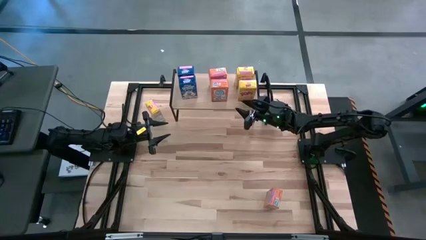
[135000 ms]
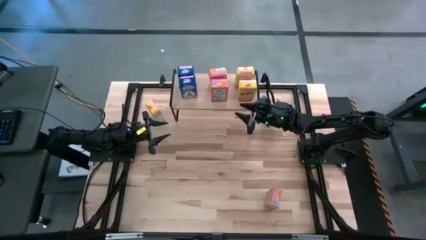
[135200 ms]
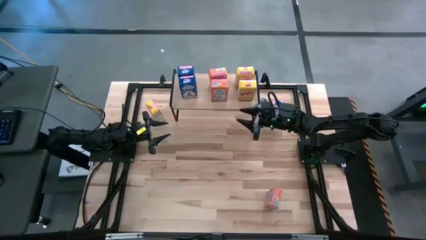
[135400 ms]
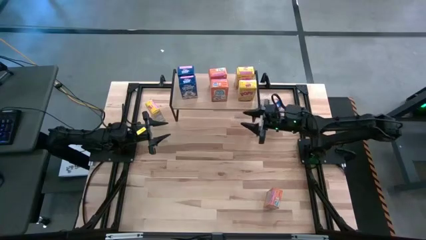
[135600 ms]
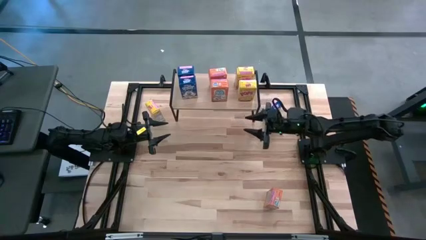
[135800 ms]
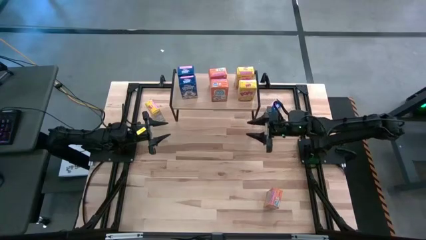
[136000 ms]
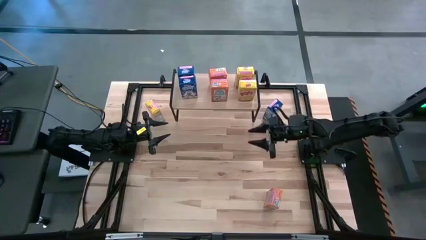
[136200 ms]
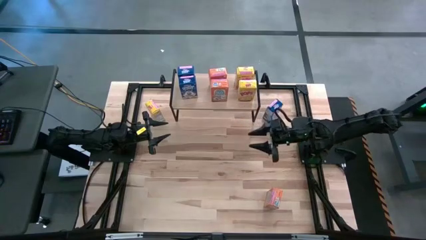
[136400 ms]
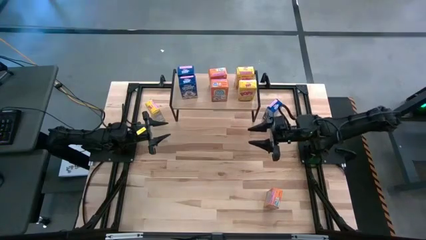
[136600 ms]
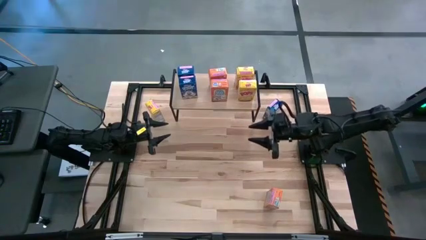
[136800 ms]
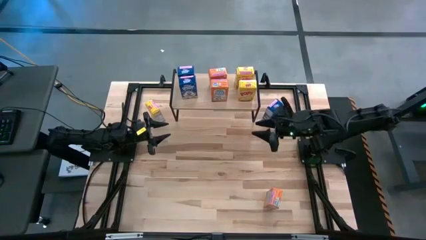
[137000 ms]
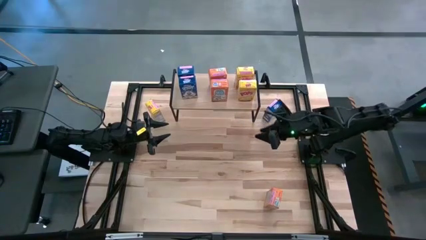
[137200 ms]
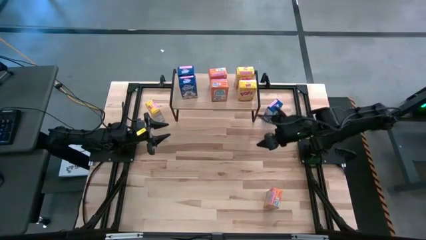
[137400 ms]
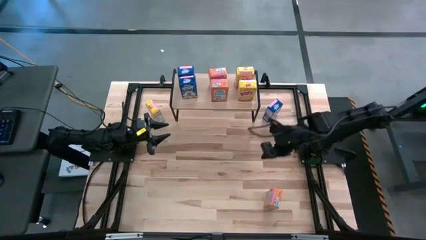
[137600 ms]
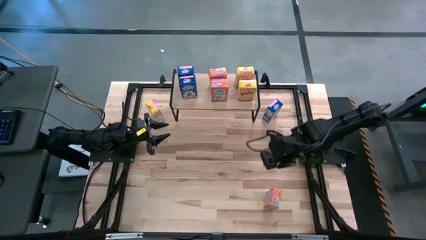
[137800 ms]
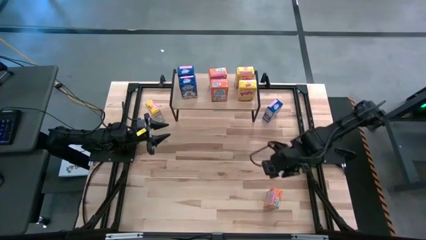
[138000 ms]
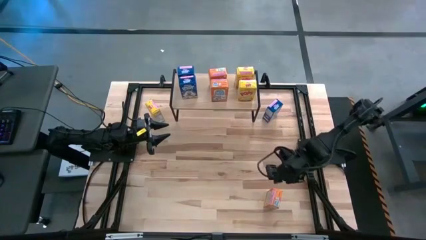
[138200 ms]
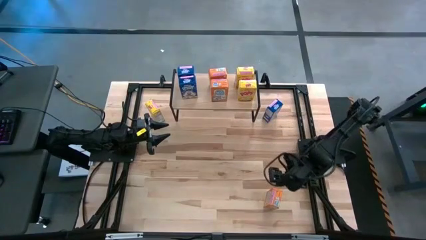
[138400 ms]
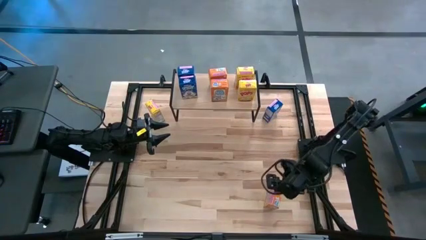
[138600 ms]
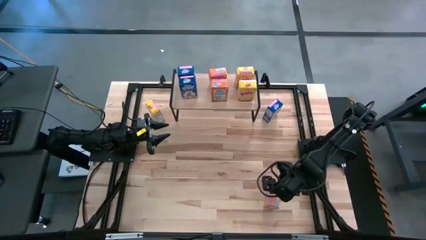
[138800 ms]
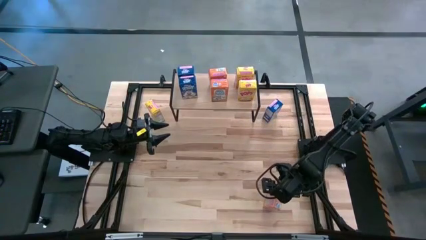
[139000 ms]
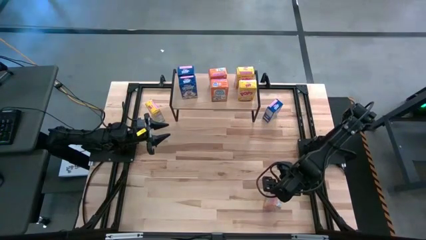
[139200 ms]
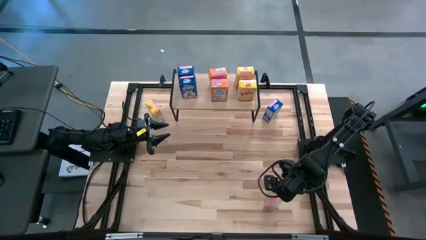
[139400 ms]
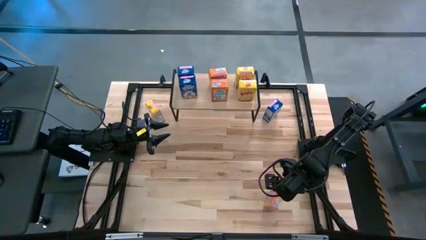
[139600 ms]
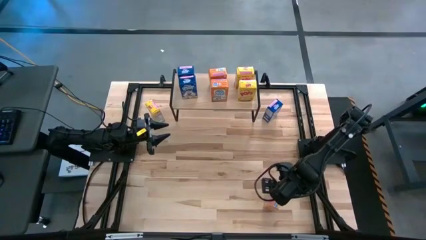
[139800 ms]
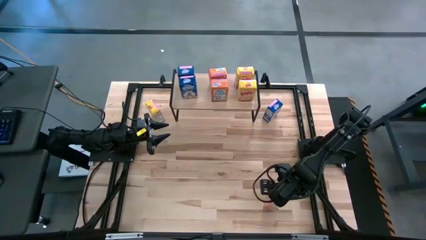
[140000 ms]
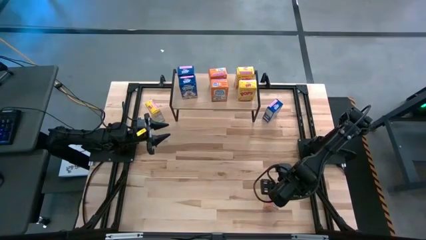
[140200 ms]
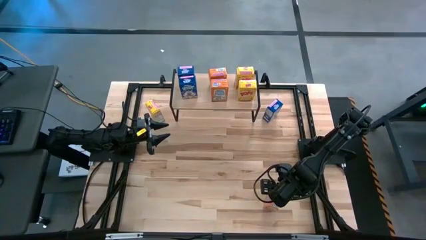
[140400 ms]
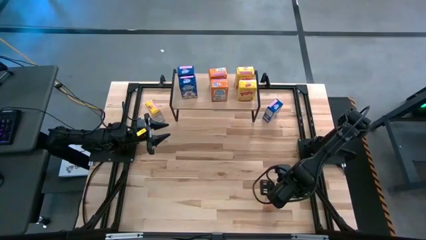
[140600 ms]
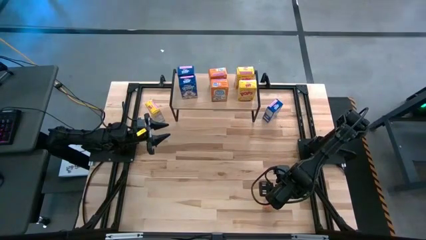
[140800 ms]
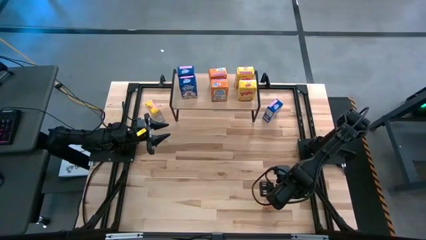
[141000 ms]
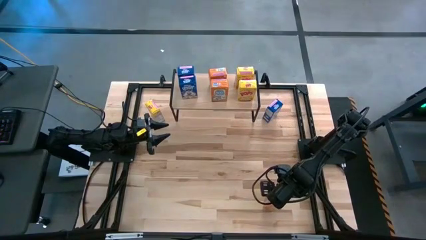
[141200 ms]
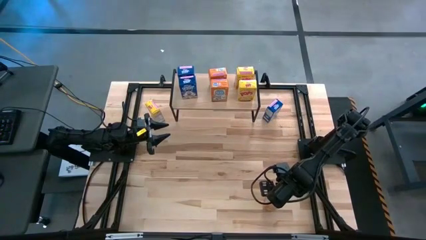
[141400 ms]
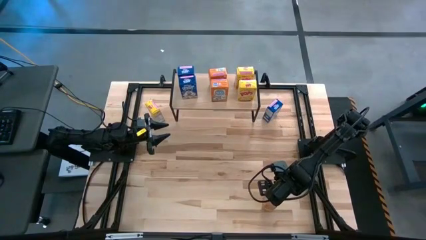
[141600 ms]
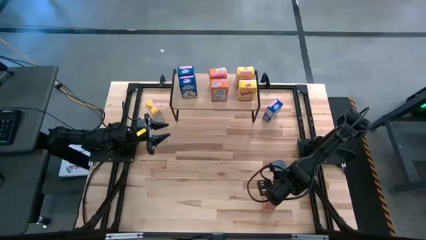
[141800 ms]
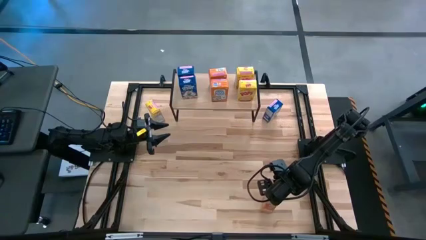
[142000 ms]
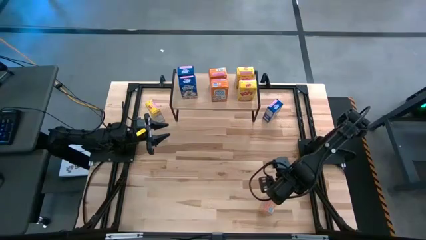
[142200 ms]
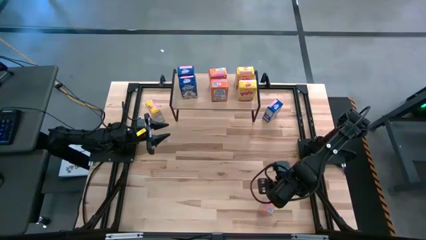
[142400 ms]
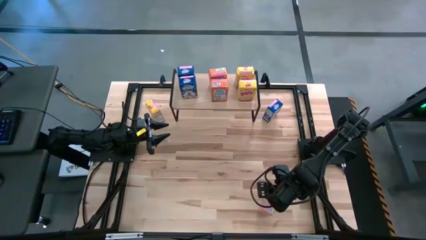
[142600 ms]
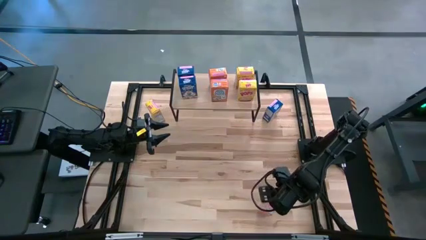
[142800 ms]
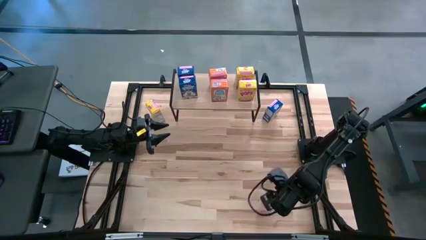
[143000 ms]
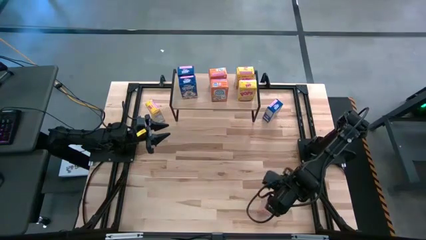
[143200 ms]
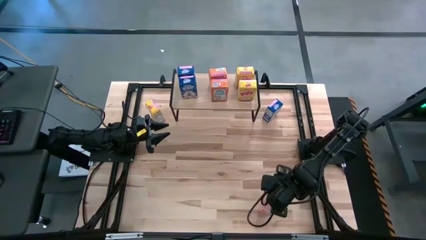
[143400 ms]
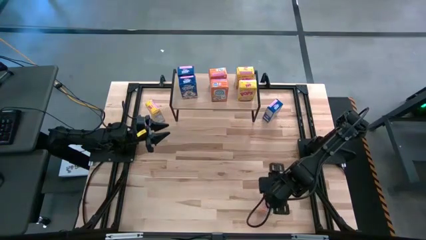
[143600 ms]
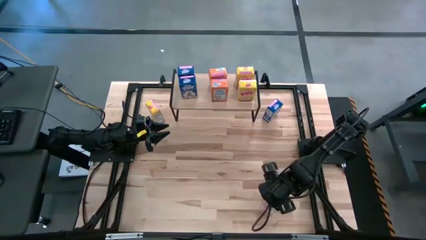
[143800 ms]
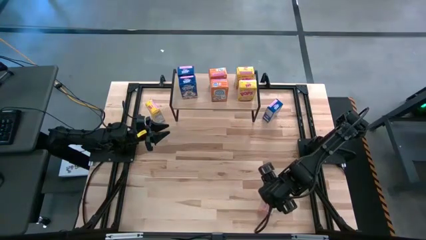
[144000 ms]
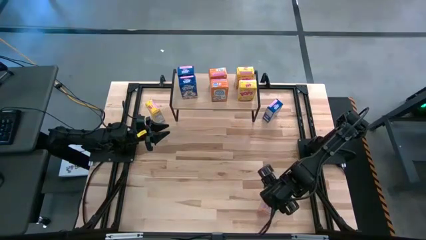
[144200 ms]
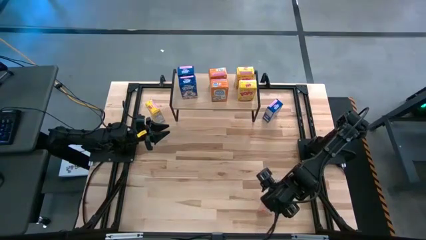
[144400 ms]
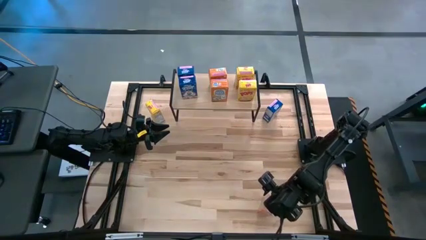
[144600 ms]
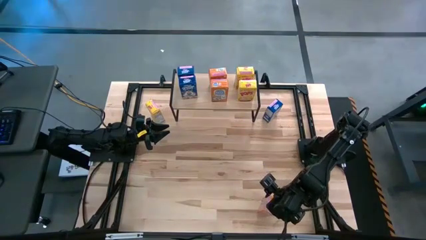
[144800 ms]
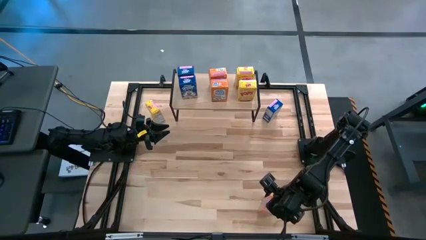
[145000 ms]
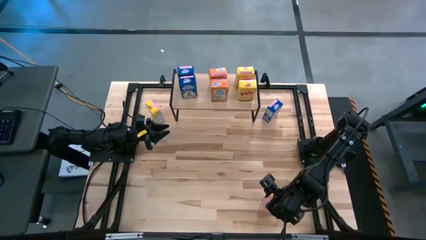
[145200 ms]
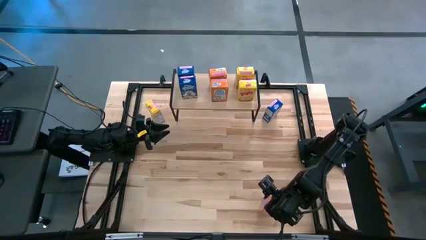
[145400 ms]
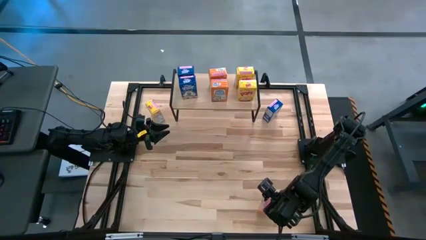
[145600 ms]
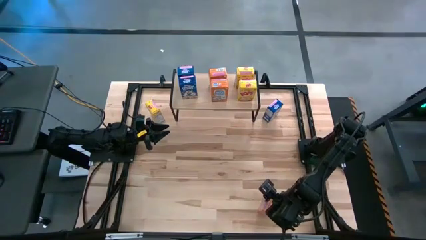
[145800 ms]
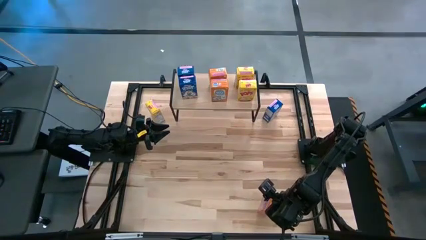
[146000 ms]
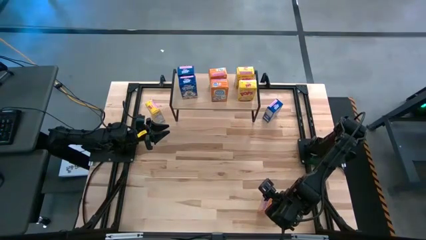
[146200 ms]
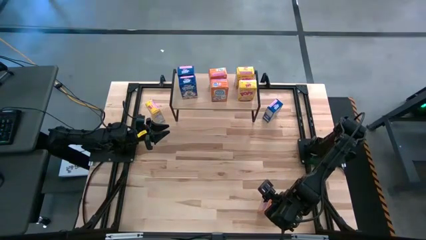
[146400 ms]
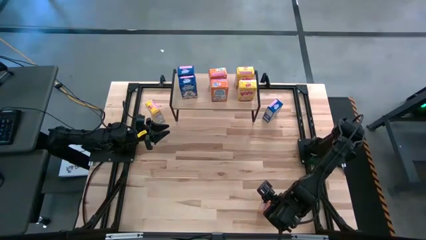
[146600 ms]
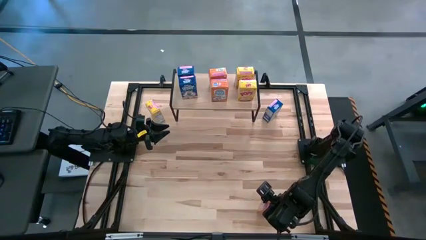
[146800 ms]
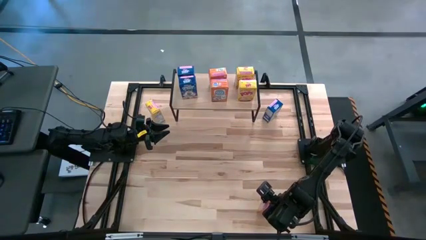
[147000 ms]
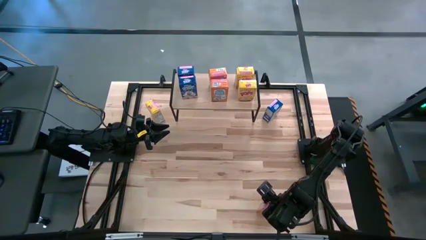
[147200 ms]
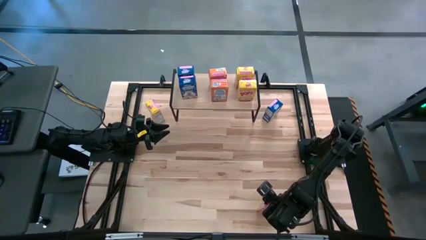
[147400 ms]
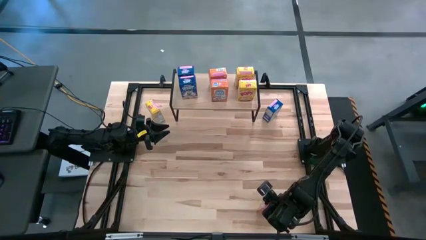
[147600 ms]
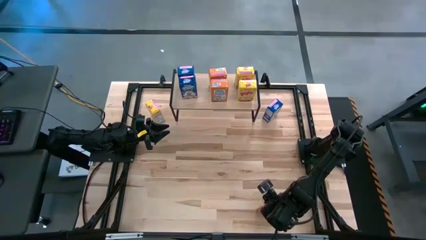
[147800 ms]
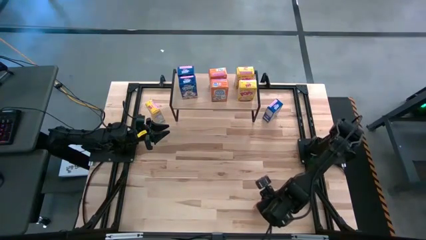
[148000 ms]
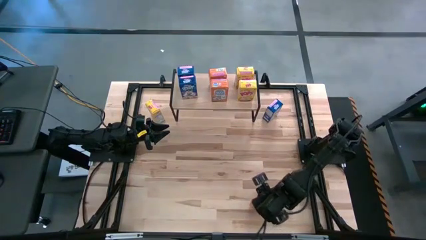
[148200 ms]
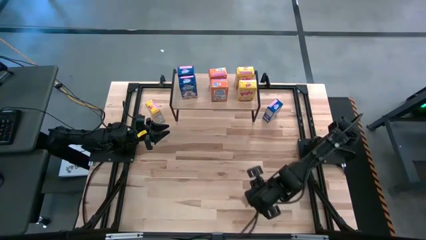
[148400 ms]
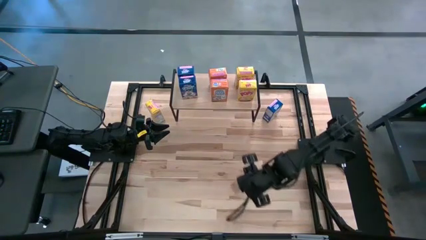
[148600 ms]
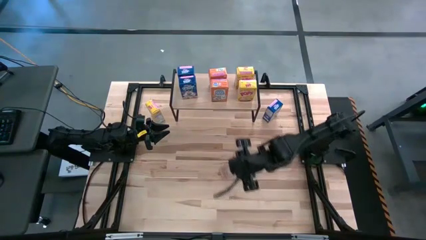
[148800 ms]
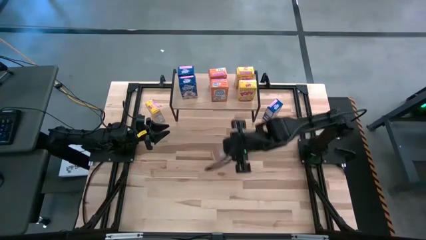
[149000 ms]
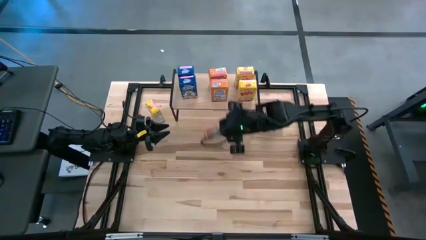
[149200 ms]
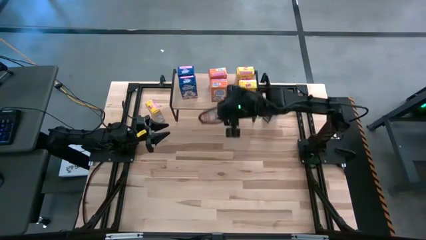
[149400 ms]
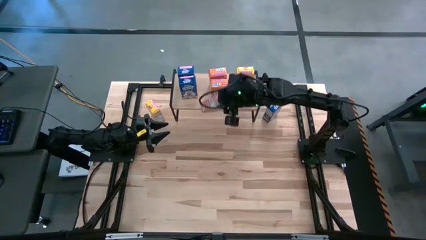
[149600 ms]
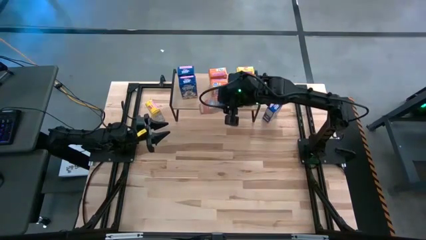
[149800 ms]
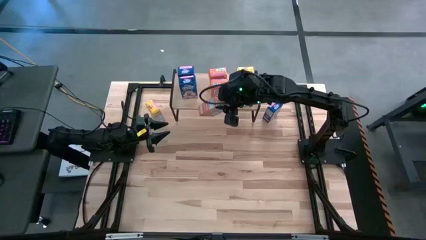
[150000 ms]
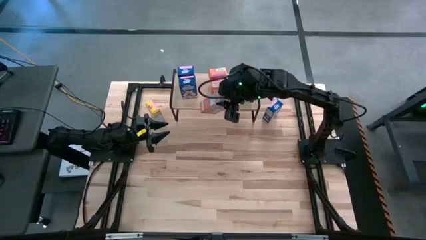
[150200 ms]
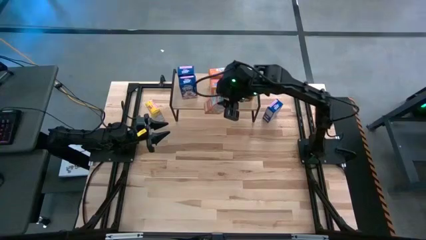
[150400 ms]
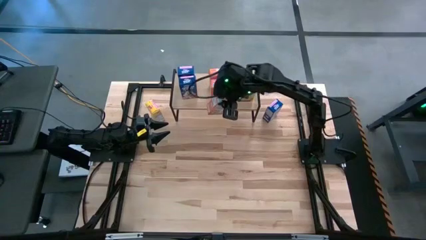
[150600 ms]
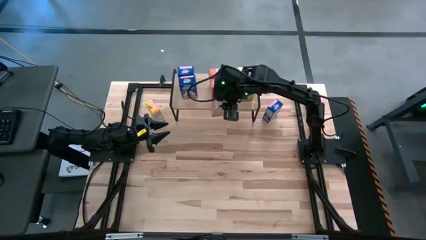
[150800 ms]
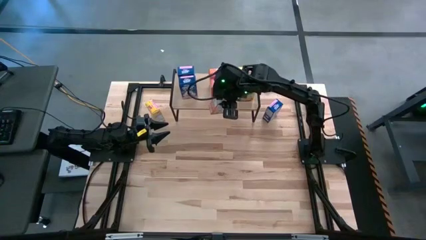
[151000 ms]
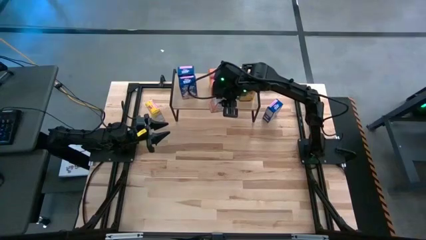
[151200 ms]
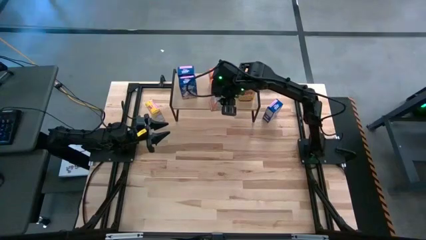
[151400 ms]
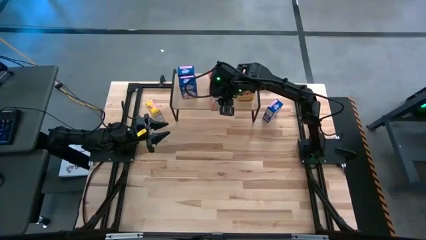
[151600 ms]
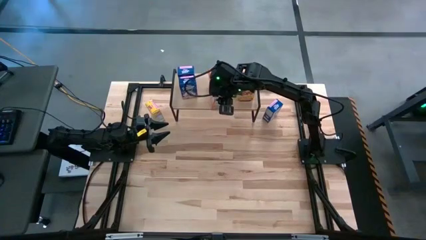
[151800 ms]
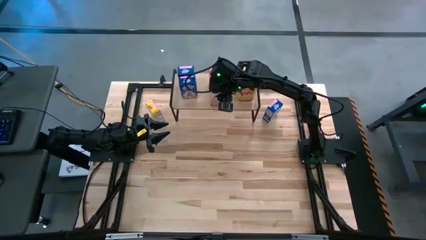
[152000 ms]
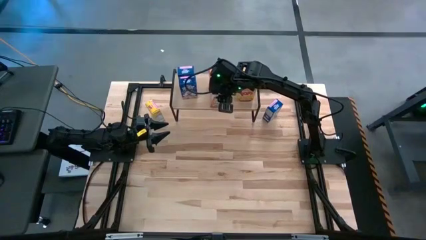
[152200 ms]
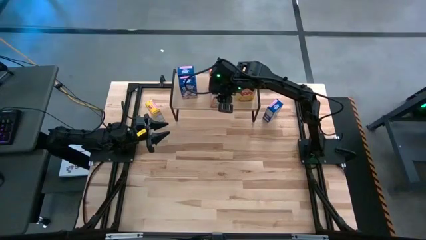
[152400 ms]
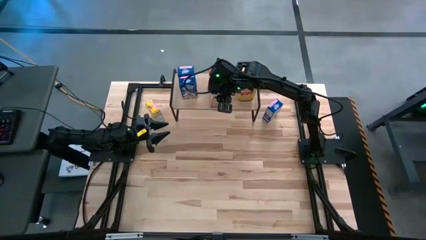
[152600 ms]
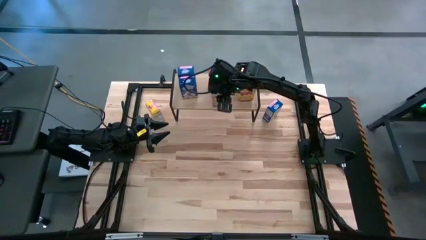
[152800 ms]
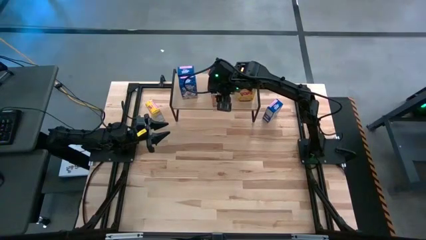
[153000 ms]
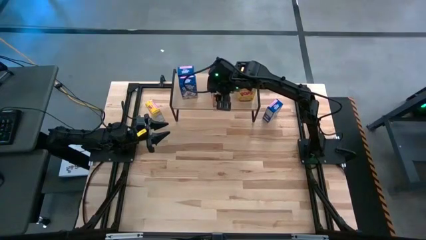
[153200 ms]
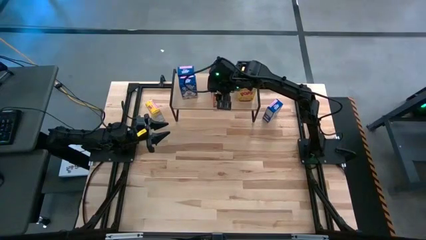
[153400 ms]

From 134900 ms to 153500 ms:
Task: Stack cereal on shelf
Put the orange cereal box aligned with the other orange cereal boxes on the shelf
